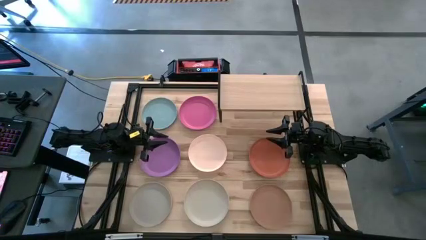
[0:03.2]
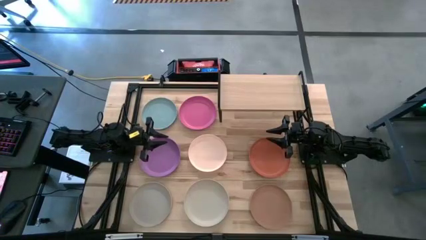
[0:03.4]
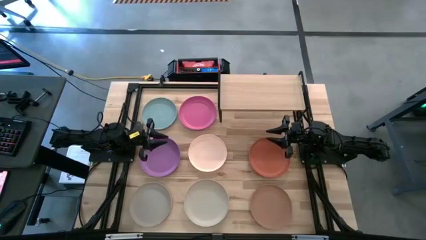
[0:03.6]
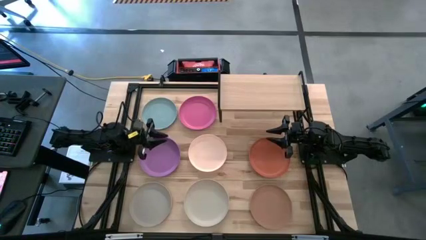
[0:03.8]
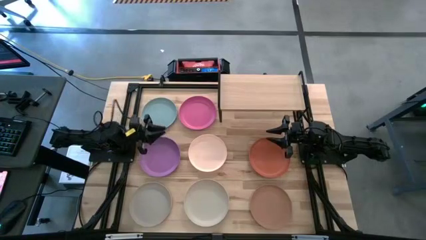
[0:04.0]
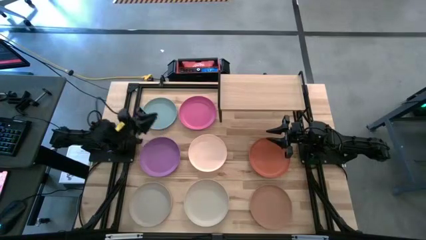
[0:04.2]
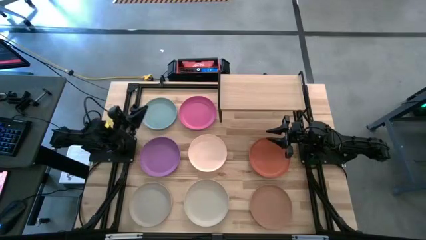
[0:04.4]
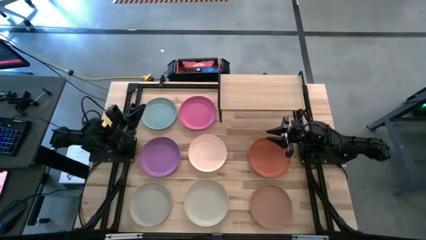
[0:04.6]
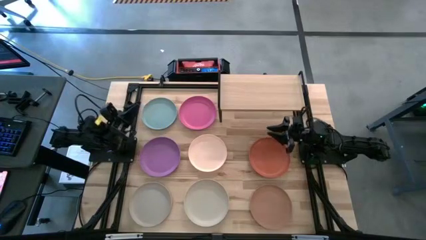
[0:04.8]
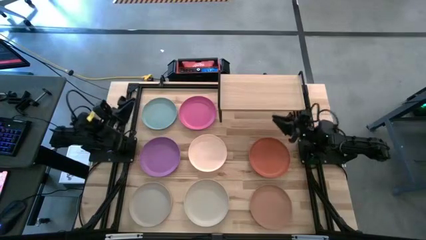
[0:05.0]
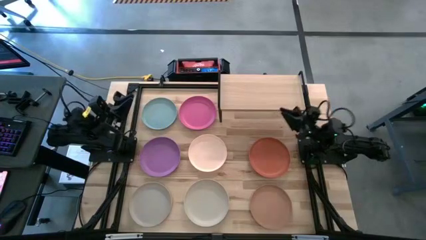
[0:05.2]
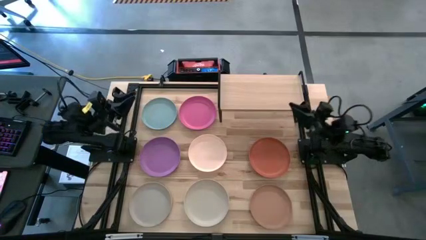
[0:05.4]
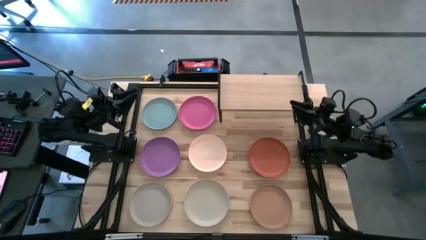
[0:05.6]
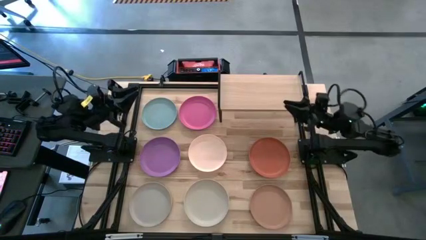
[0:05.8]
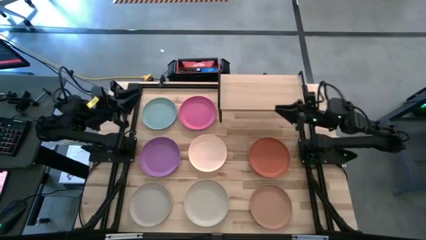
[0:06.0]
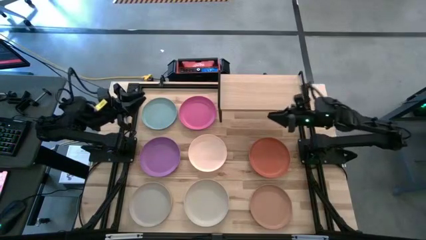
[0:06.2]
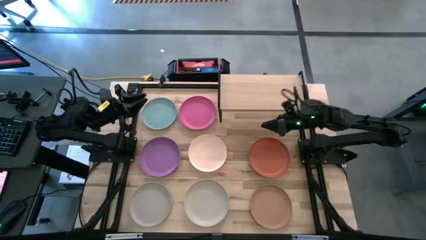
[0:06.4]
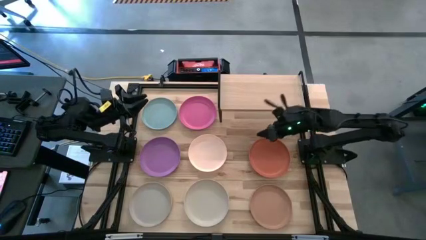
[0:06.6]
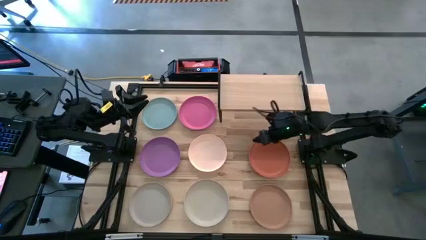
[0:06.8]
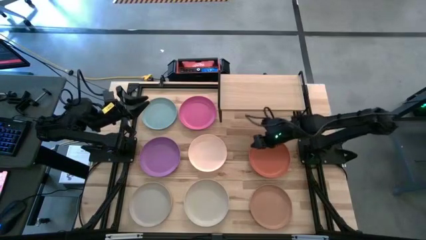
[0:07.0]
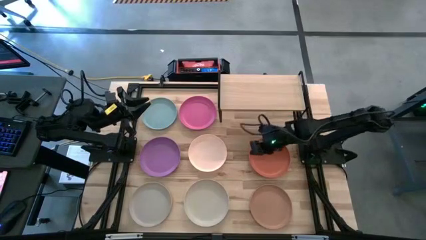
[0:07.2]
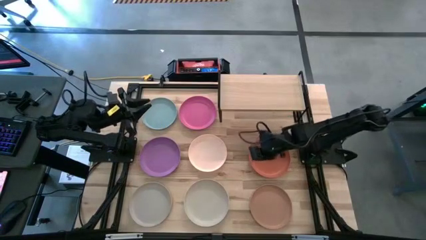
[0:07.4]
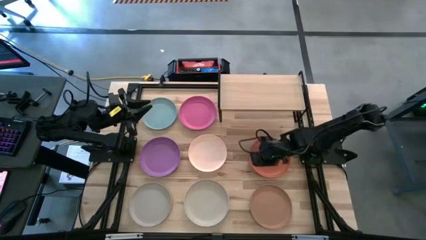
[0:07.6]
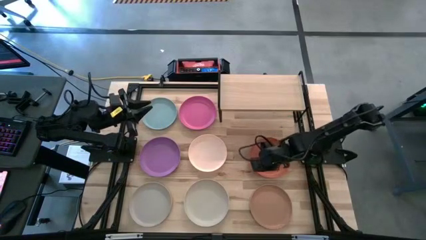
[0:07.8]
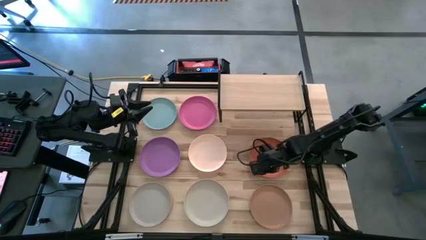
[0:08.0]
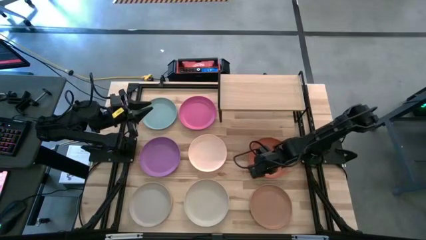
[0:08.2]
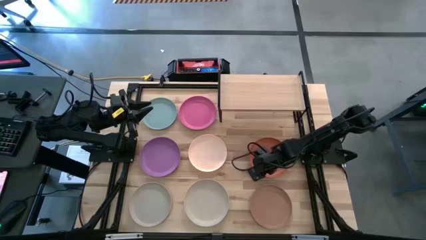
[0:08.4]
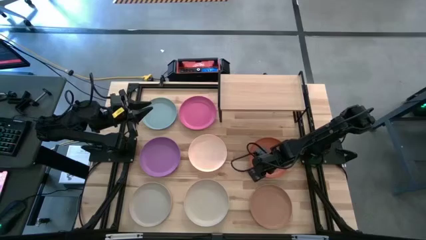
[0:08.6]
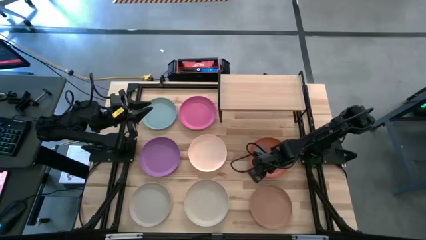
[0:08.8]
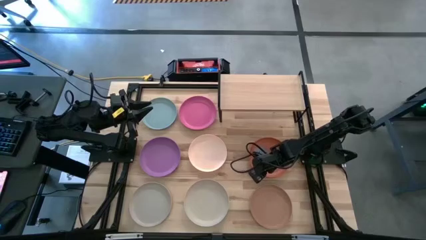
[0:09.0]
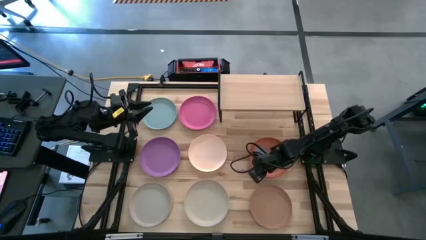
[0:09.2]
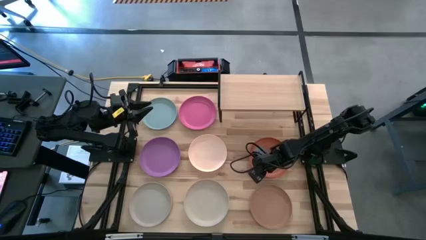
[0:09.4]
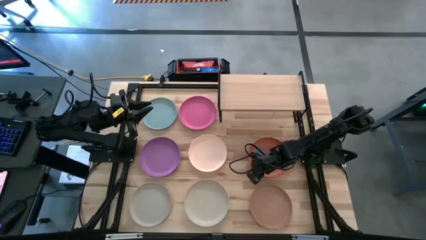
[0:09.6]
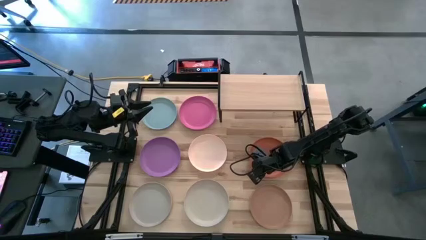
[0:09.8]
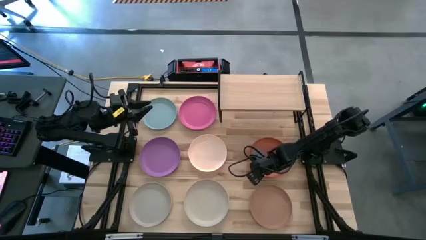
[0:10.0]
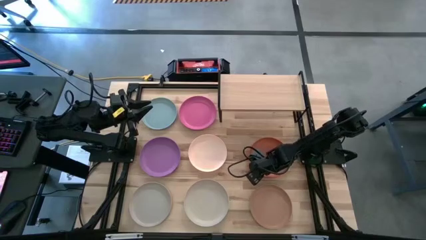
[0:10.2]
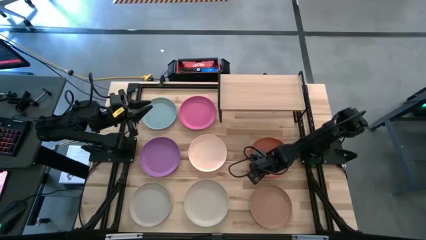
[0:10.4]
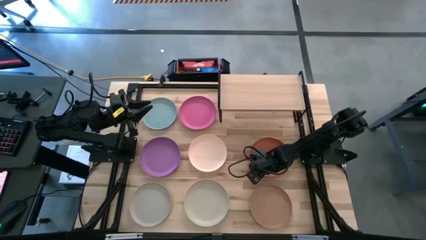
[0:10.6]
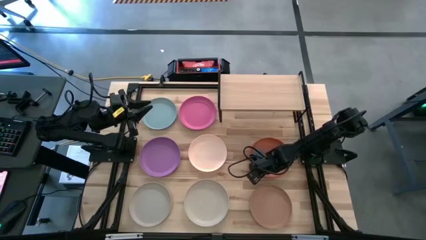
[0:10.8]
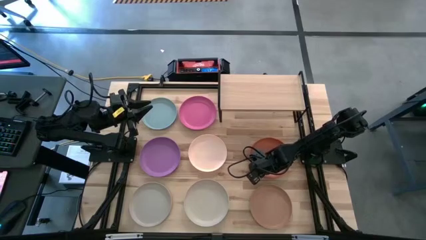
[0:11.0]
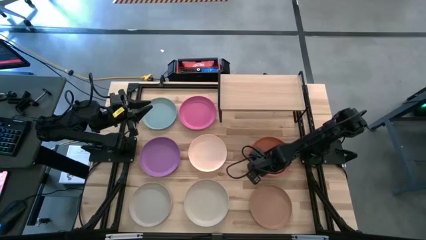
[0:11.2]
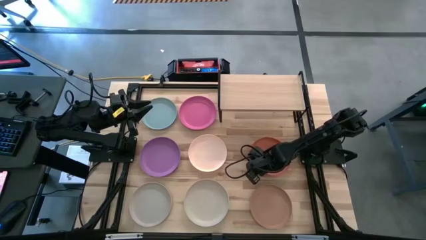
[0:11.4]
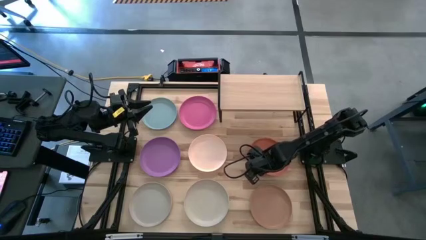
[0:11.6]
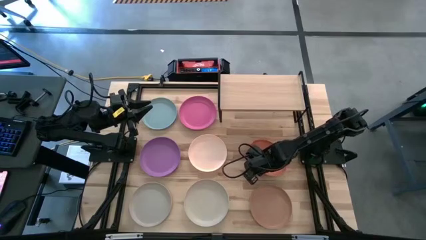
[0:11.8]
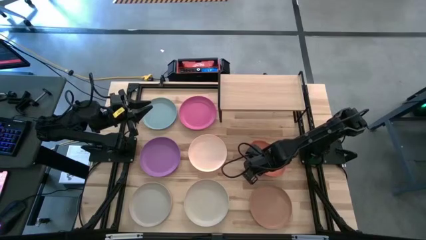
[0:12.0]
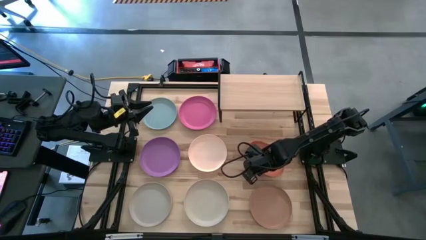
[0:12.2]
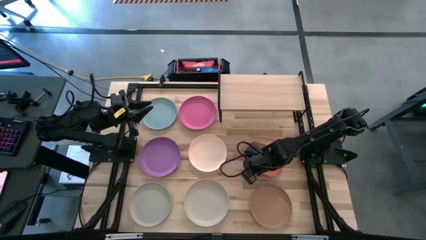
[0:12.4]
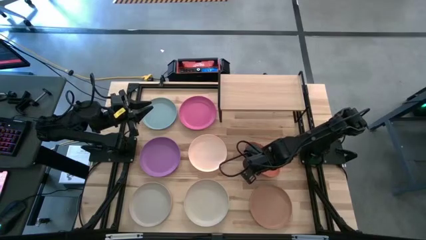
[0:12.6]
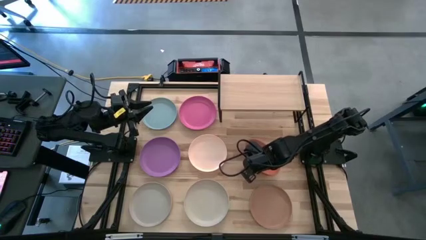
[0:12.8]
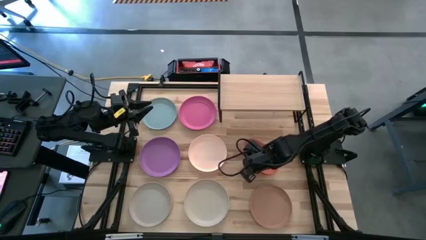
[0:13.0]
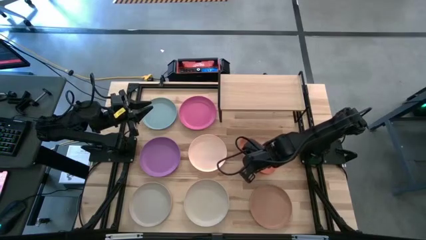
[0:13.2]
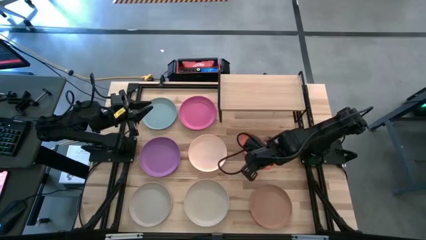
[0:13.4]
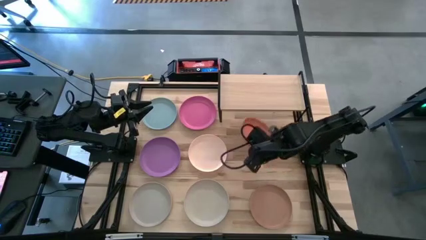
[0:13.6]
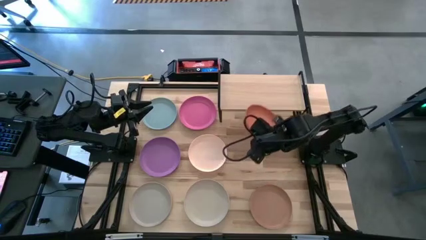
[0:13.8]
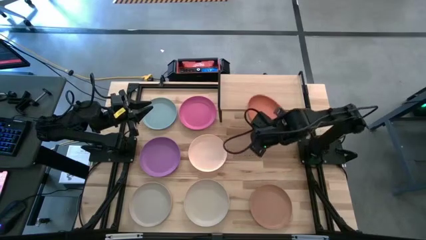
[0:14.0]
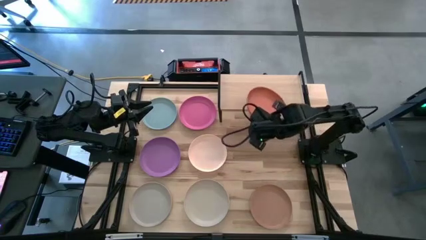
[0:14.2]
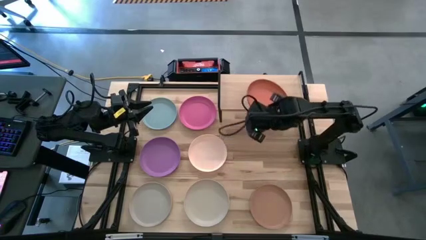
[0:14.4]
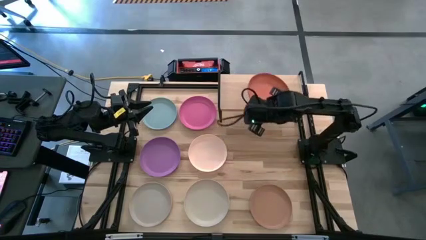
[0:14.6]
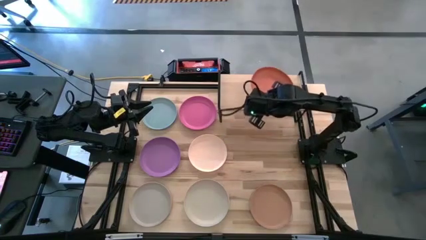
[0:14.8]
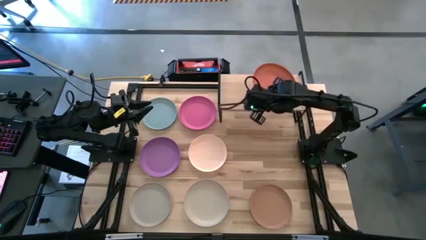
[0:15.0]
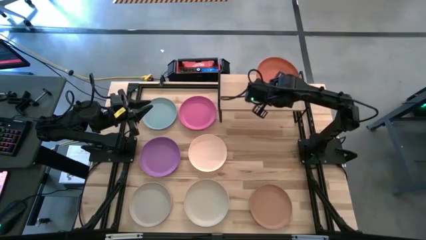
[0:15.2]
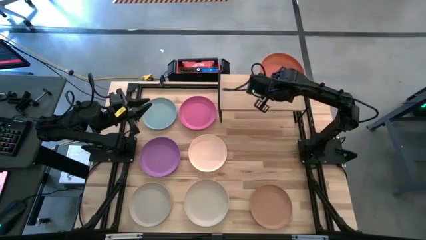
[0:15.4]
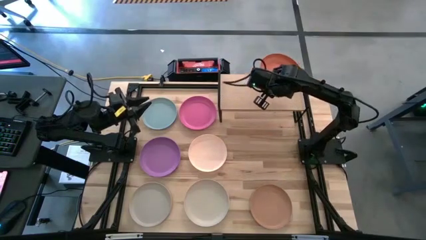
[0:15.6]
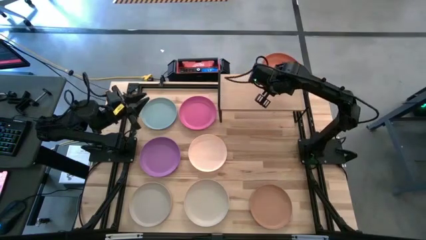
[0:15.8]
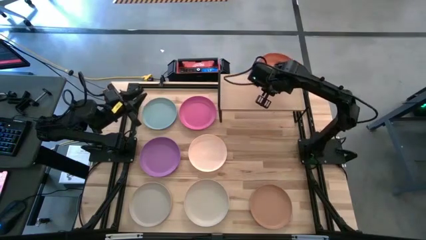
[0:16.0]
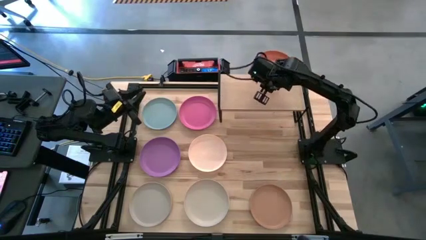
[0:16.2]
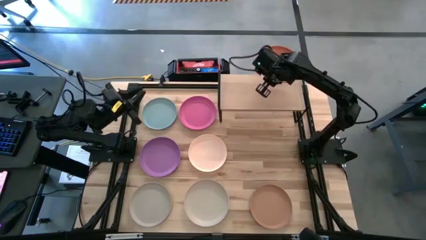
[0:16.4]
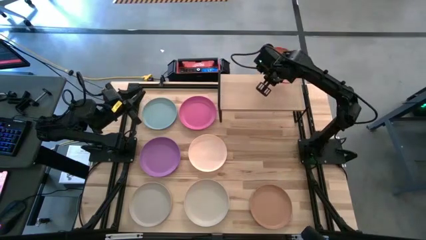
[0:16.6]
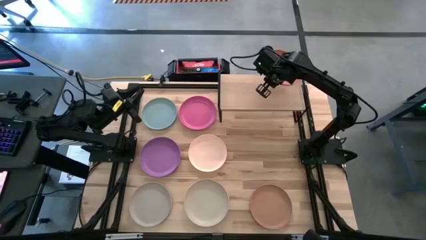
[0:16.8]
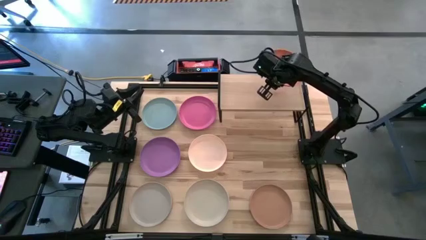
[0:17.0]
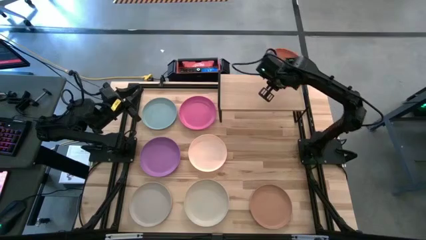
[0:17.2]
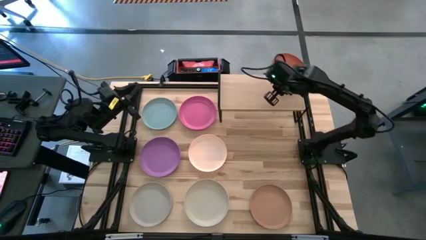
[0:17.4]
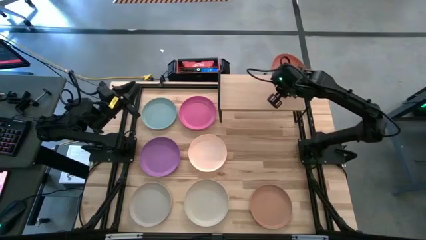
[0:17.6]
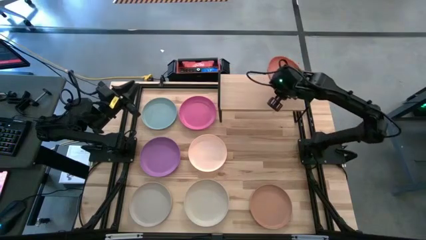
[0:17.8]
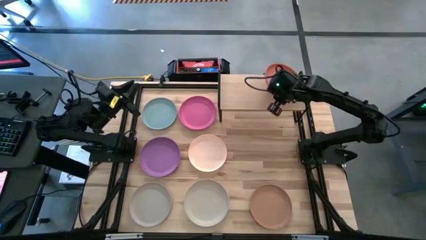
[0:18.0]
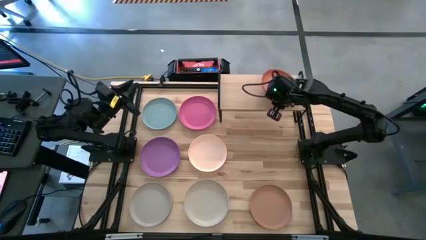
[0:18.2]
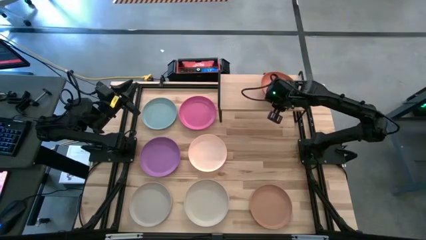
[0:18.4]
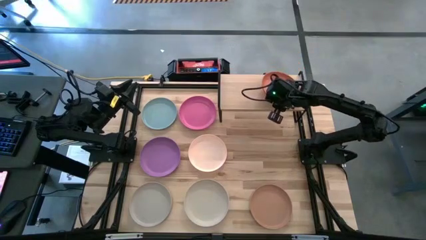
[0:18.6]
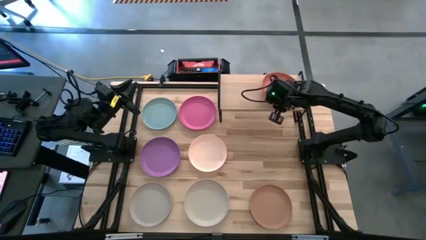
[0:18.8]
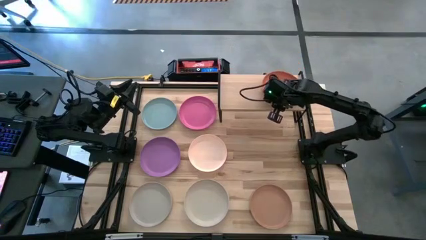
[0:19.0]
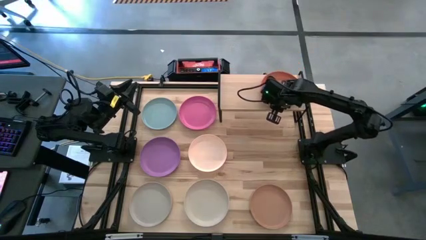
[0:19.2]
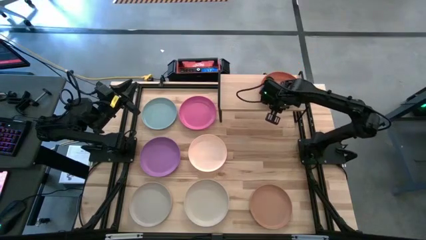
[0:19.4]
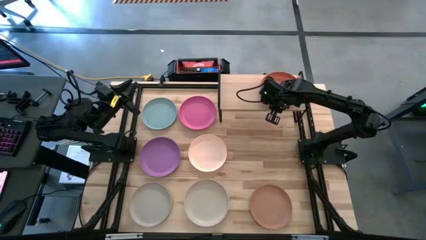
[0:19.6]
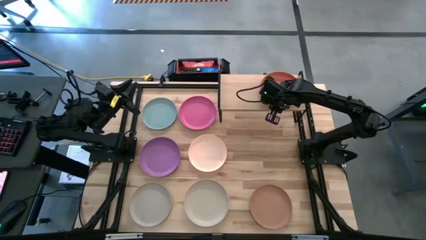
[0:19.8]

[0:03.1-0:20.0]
Task: Place and stack plates onto a shelf
Put the orange plate on the shelf
